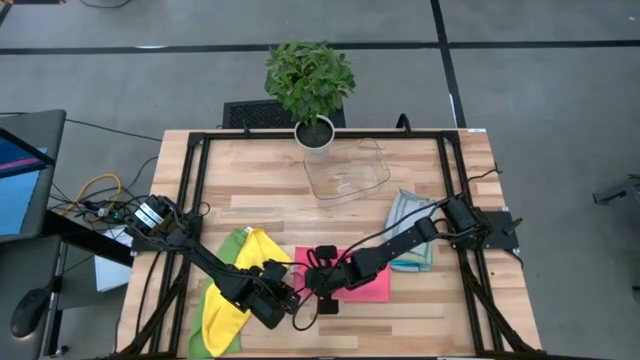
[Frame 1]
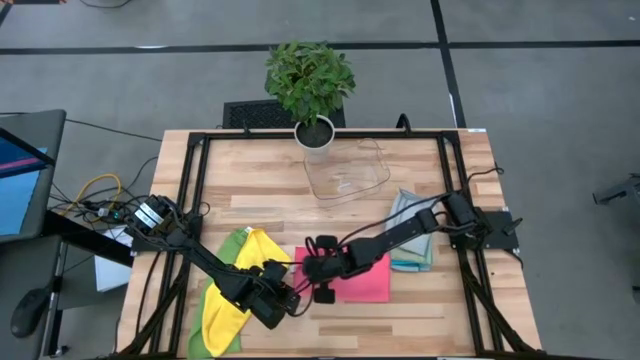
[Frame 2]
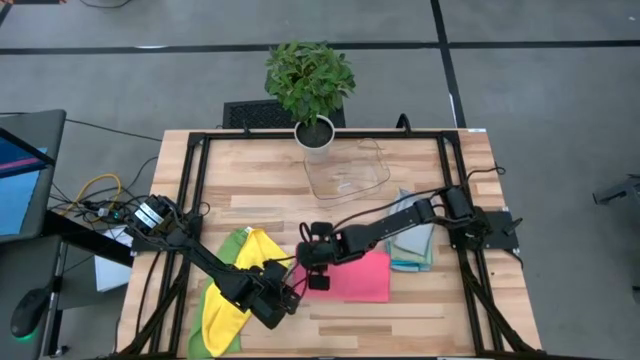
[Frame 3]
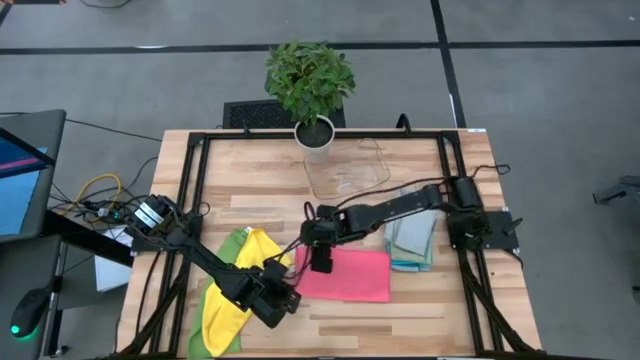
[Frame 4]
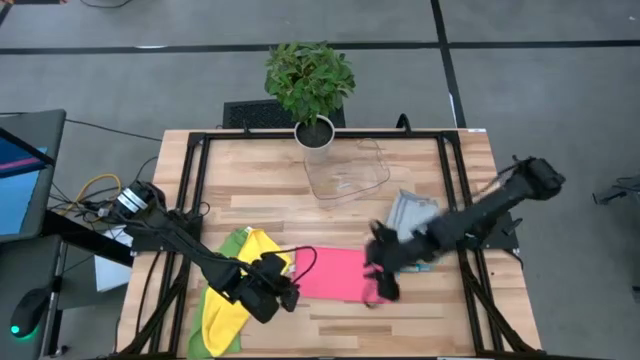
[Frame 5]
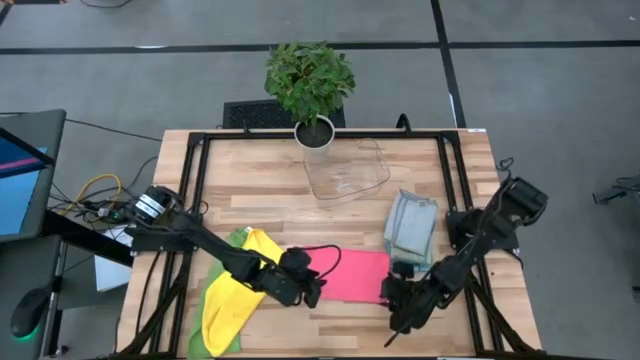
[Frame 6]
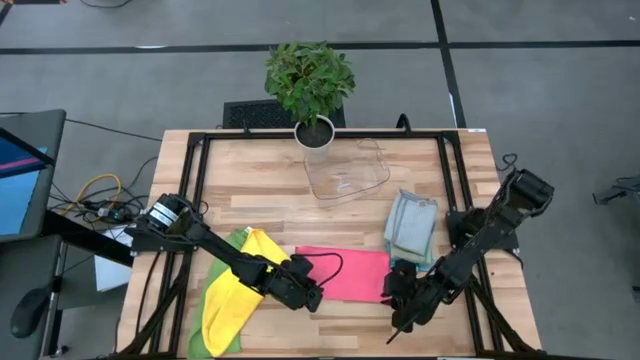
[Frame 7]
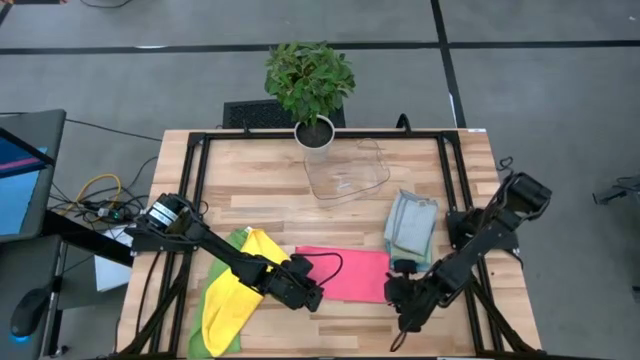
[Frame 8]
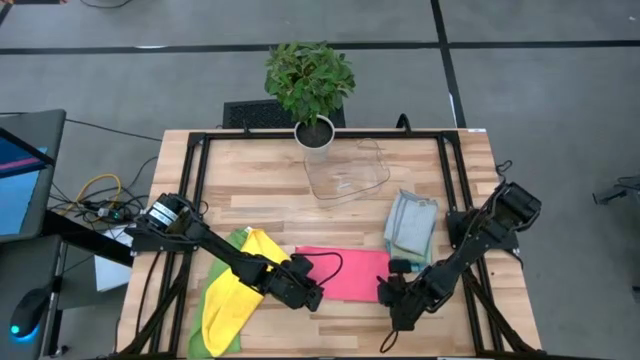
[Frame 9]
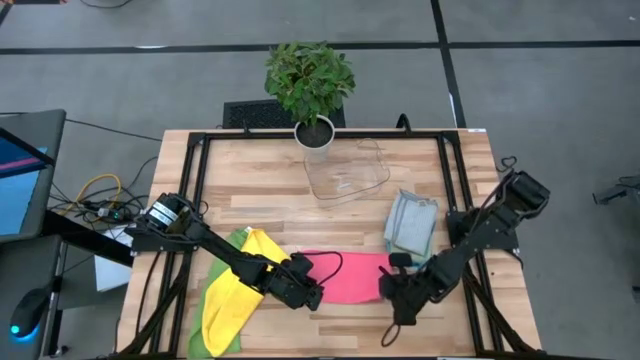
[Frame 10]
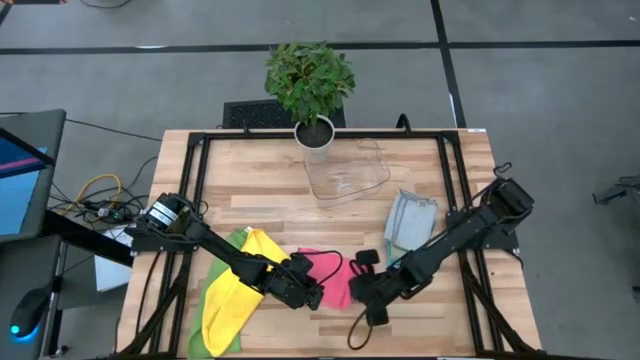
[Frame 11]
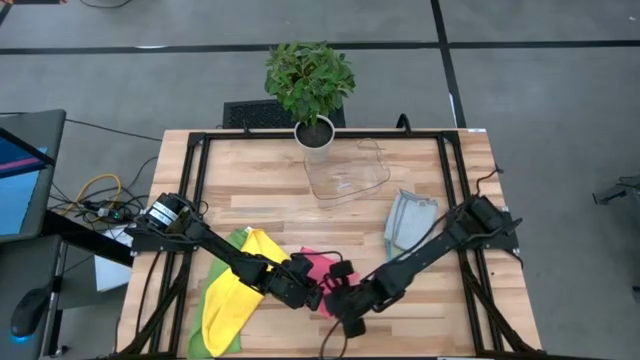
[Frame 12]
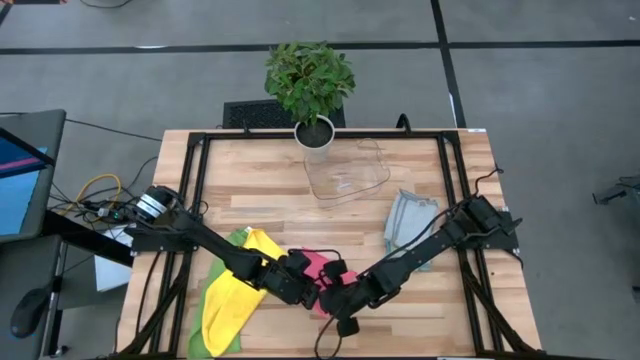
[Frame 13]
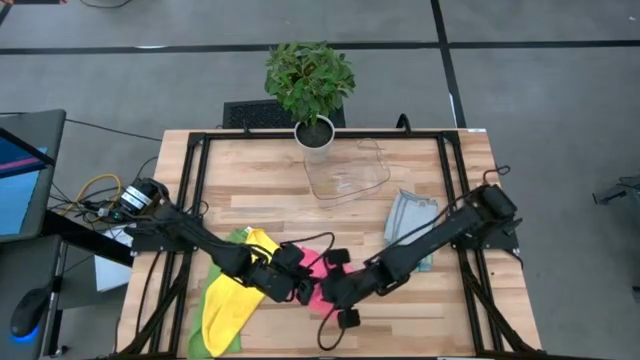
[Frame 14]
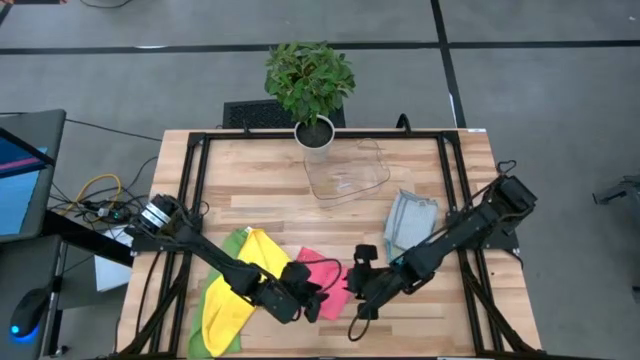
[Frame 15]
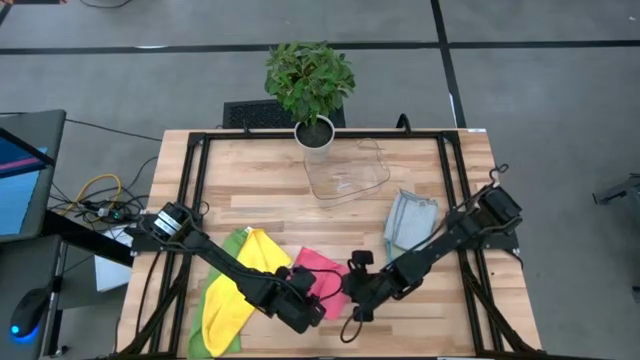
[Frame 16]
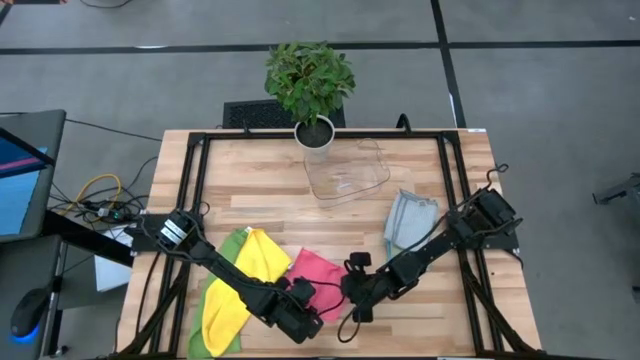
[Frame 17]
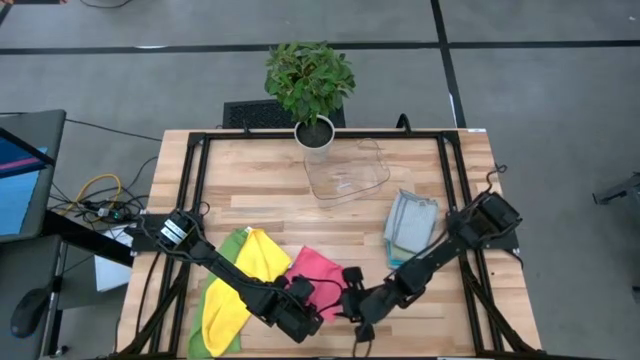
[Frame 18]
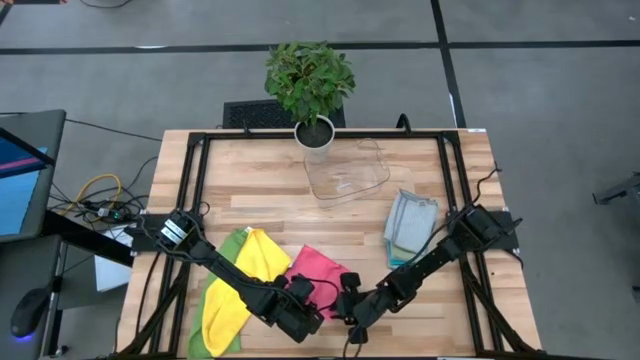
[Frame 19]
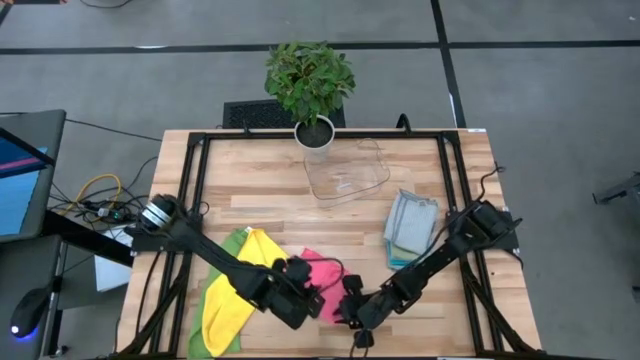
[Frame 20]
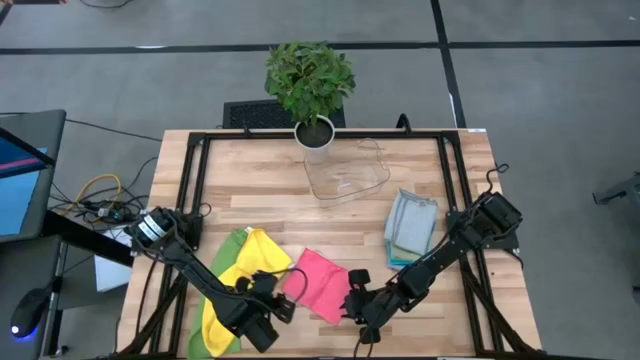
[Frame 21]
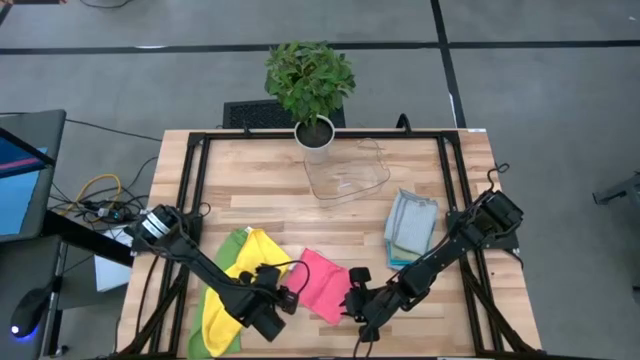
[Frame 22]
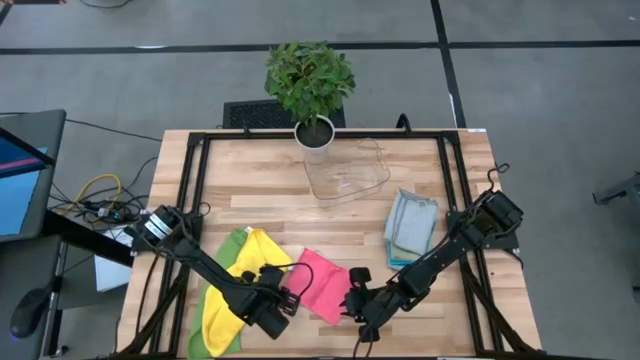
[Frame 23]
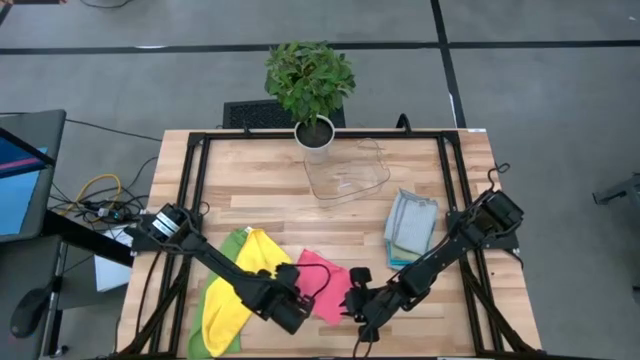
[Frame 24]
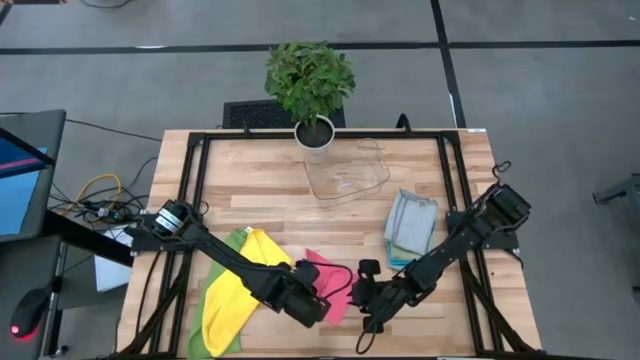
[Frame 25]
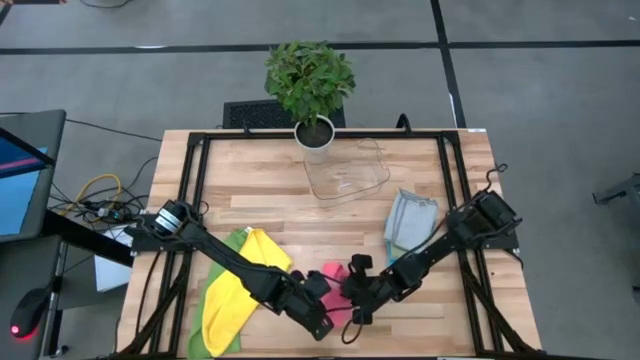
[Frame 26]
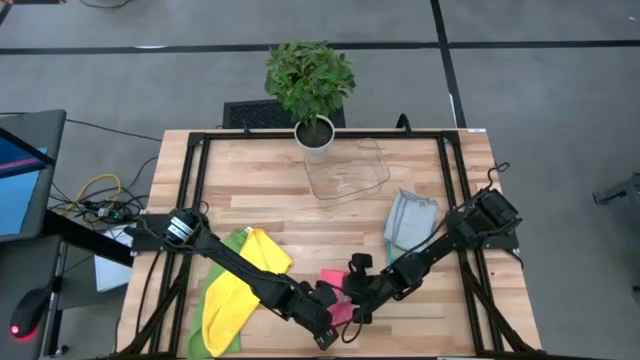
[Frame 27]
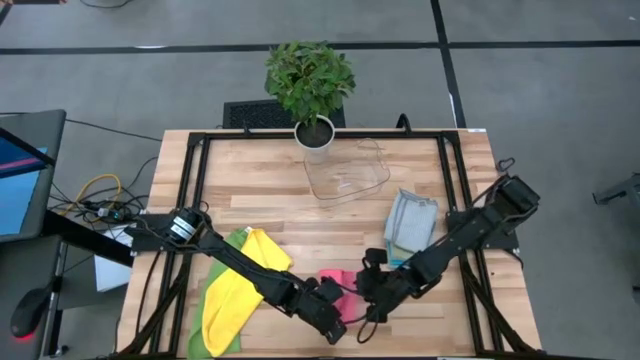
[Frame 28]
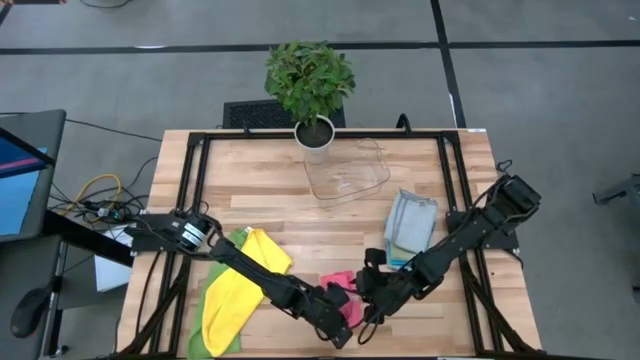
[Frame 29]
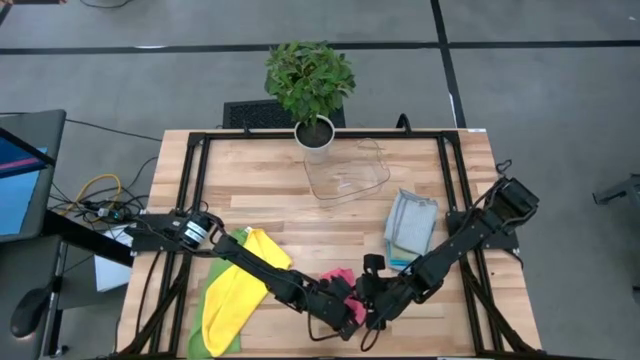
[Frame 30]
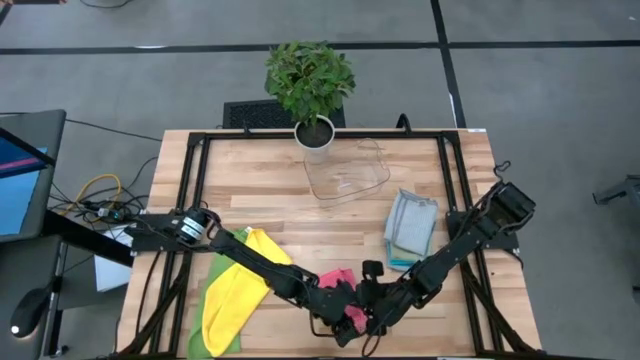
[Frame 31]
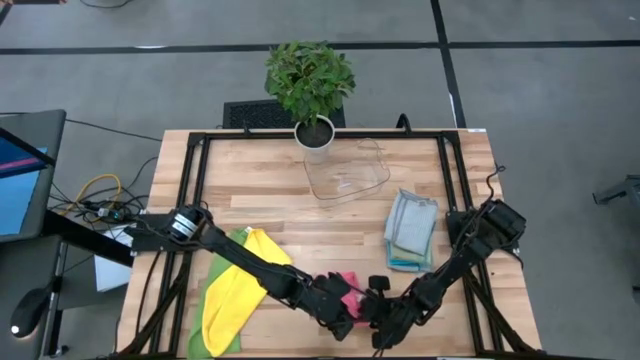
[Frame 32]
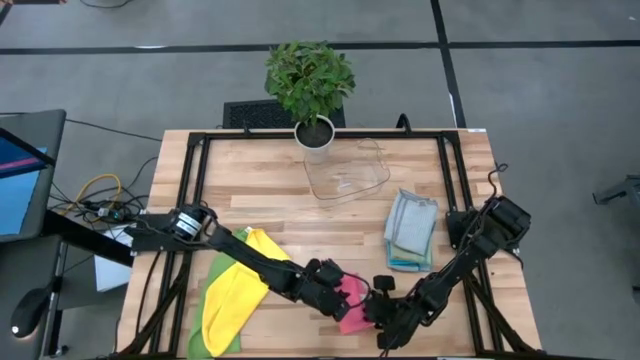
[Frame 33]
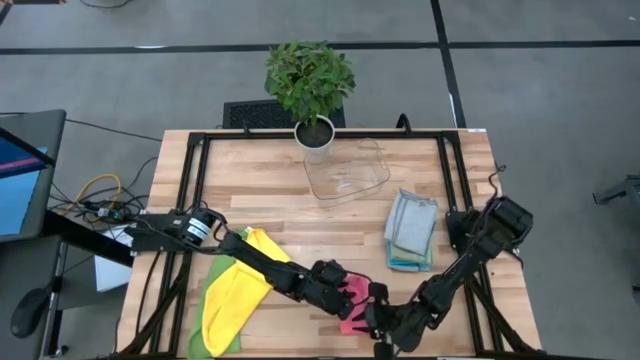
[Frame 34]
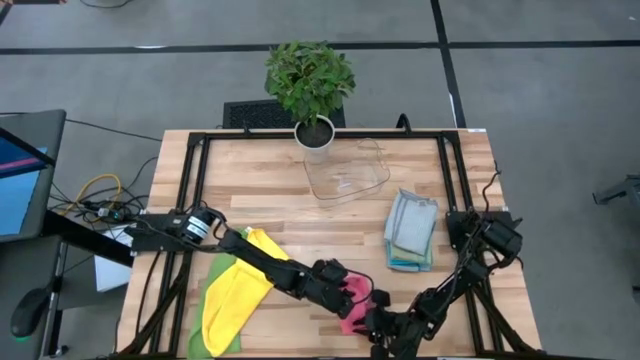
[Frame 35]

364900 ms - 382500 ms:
Task: Fold microfiber towels
Fold the pink microfiber cloth

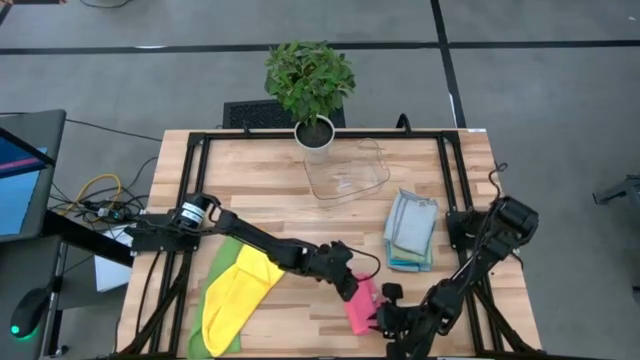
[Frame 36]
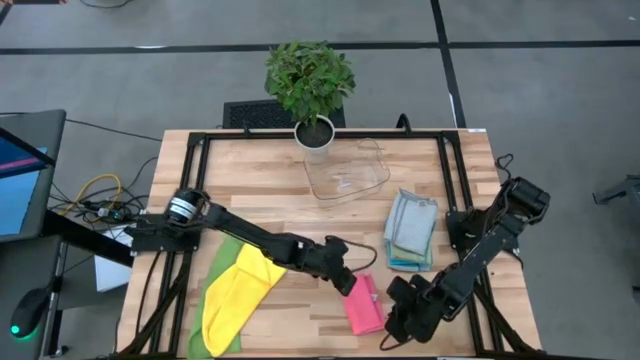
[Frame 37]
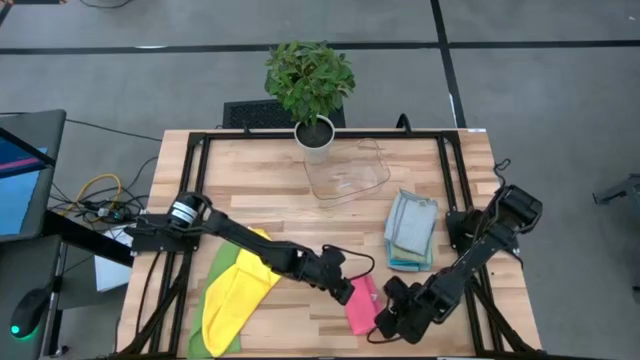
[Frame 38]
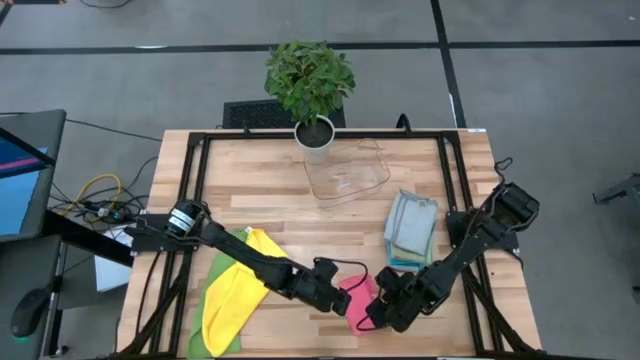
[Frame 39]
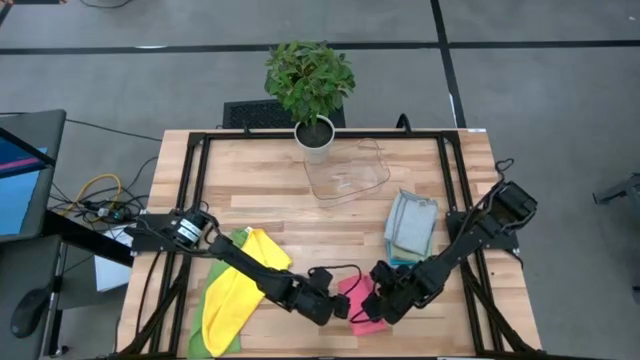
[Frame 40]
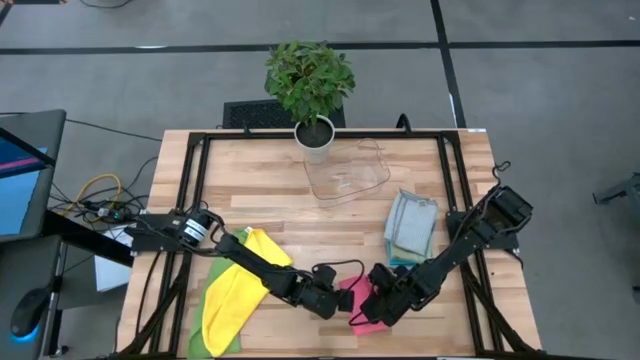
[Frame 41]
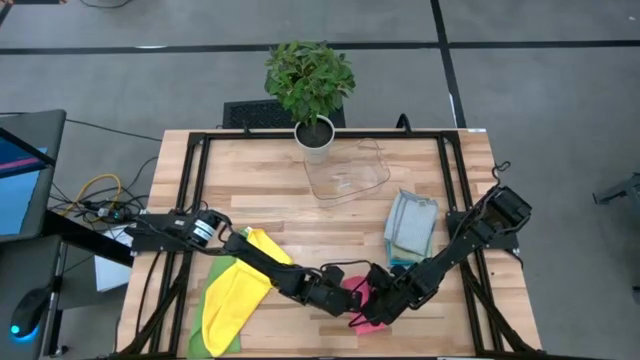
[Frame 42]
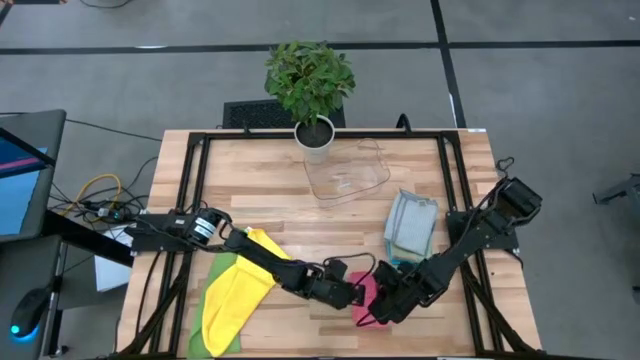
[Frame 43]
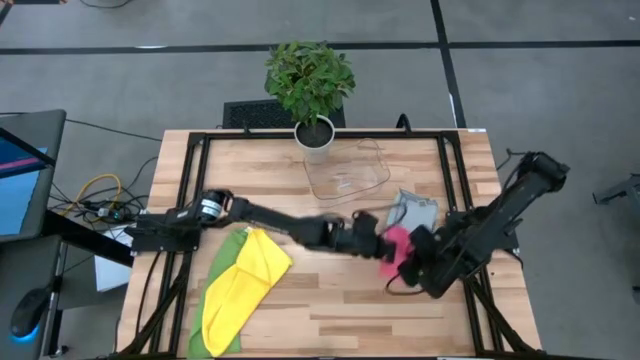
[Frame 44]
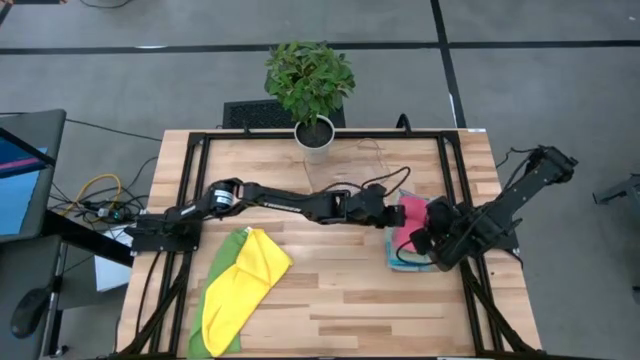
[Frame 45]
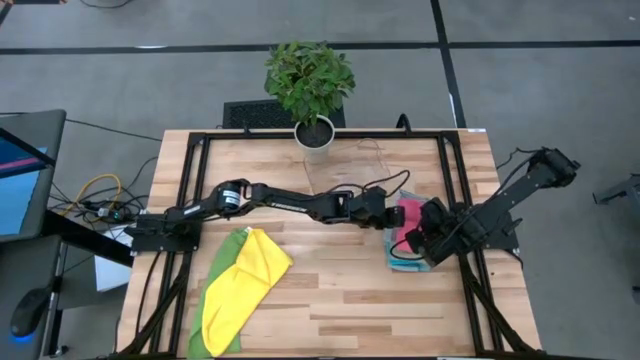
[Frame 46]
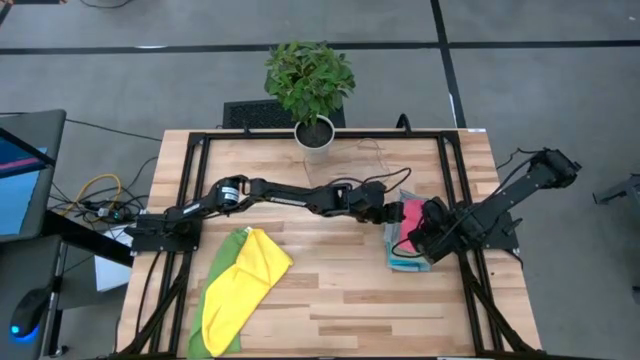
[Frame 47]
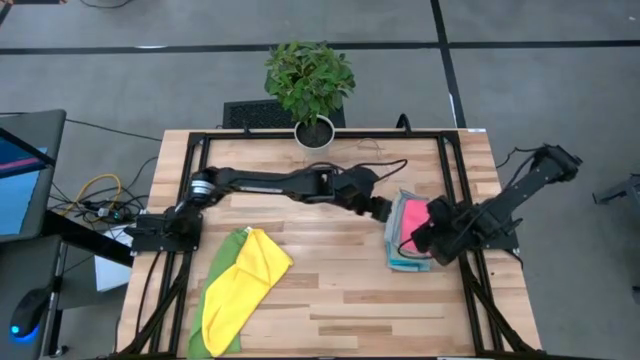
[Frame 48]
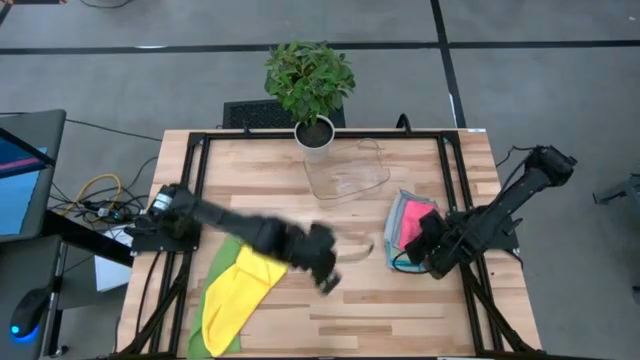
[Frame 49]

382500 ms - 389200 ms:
Stack the pink microfiber cloth on top of the gray microfiber cloth
